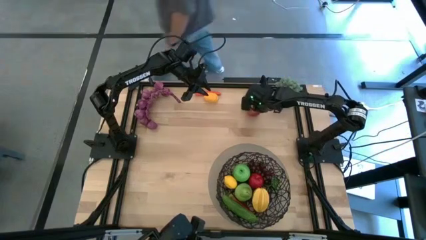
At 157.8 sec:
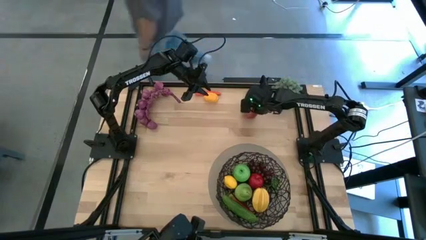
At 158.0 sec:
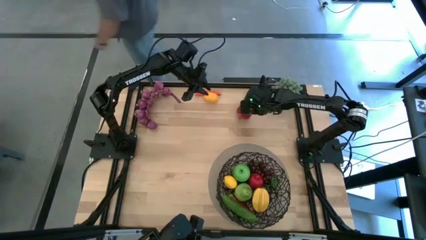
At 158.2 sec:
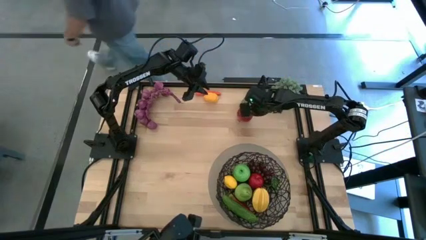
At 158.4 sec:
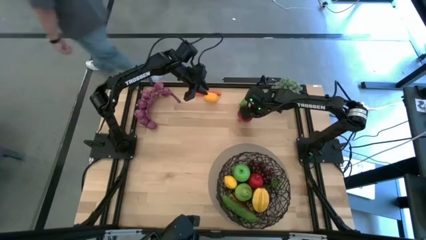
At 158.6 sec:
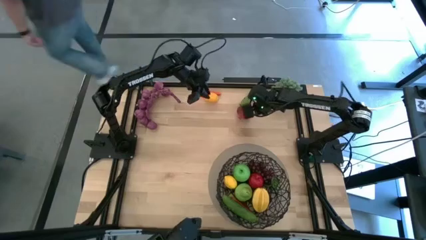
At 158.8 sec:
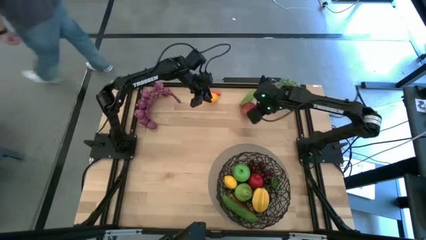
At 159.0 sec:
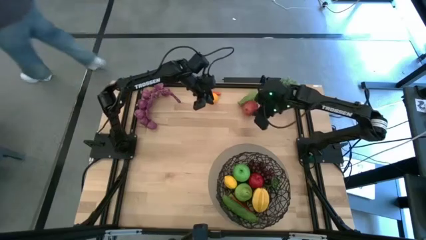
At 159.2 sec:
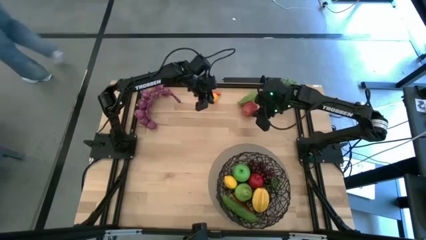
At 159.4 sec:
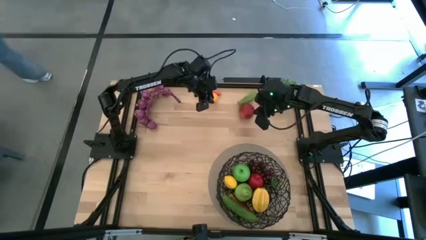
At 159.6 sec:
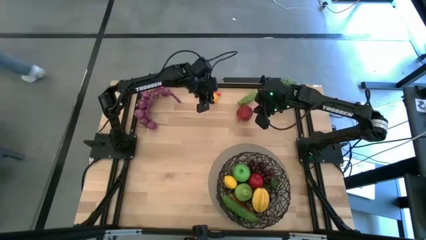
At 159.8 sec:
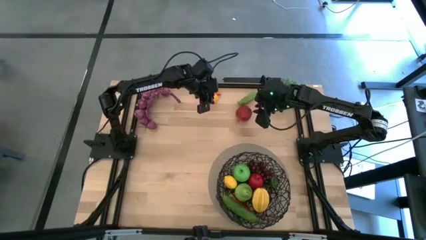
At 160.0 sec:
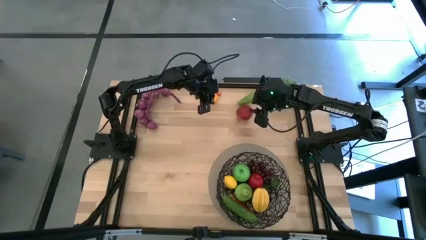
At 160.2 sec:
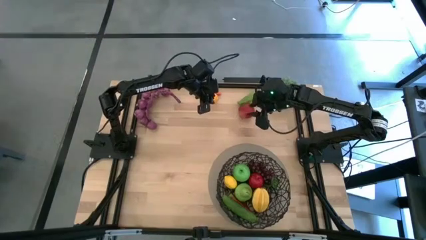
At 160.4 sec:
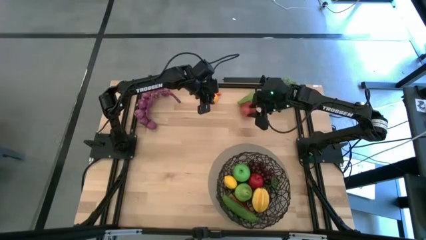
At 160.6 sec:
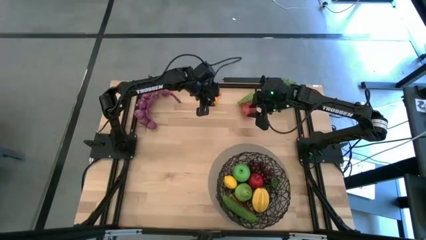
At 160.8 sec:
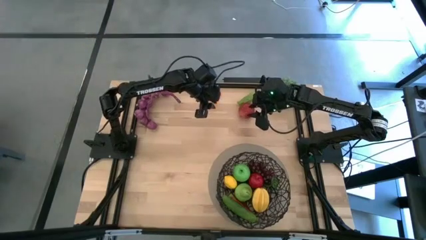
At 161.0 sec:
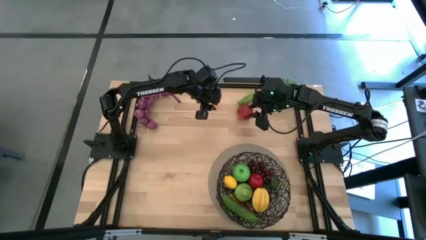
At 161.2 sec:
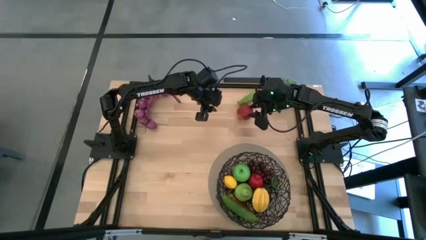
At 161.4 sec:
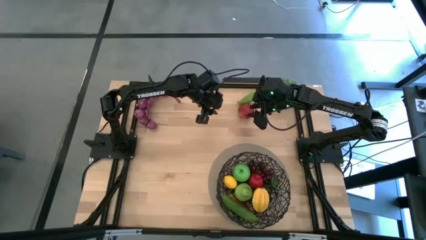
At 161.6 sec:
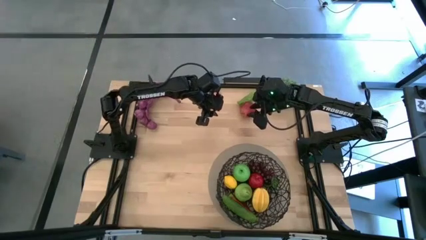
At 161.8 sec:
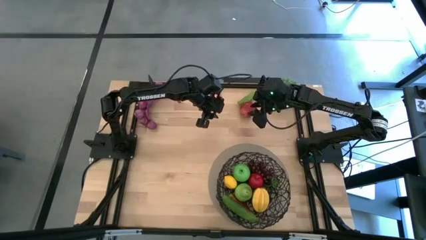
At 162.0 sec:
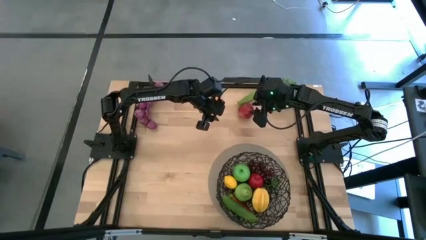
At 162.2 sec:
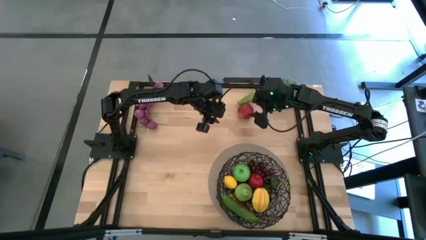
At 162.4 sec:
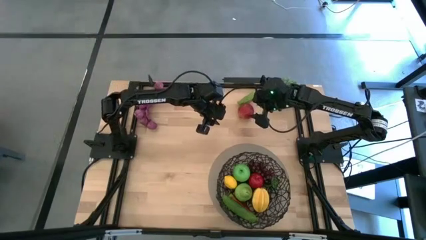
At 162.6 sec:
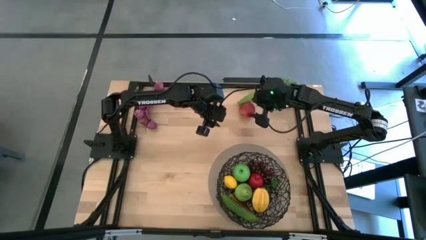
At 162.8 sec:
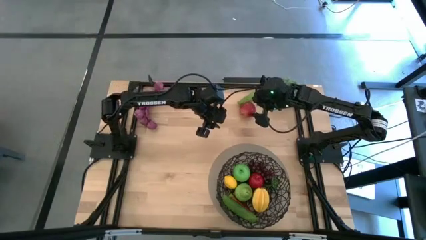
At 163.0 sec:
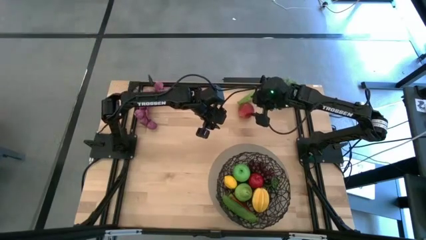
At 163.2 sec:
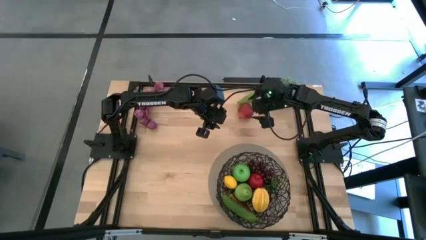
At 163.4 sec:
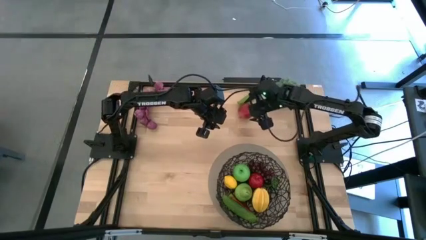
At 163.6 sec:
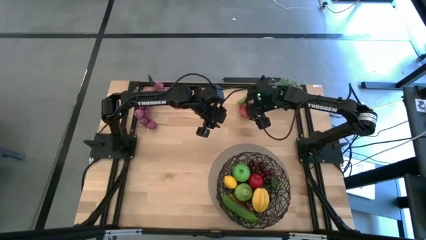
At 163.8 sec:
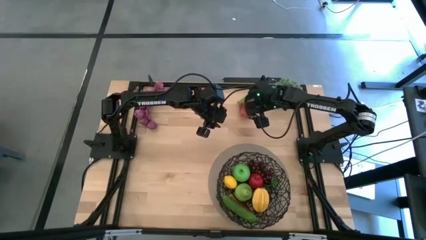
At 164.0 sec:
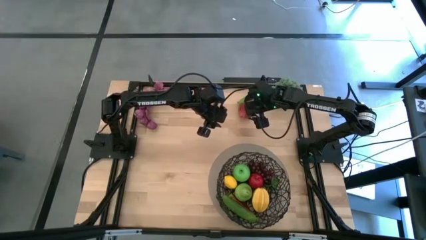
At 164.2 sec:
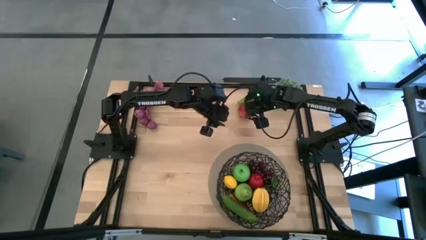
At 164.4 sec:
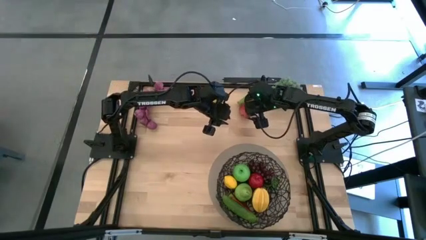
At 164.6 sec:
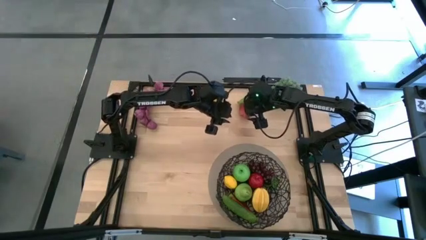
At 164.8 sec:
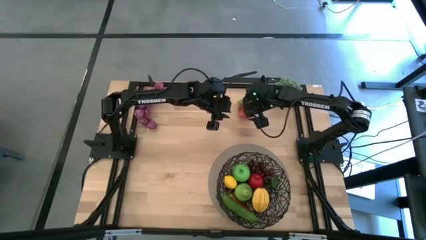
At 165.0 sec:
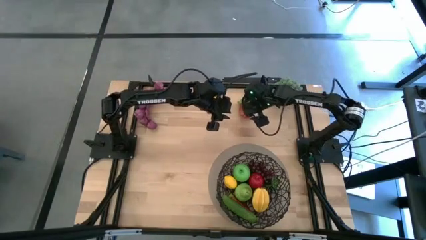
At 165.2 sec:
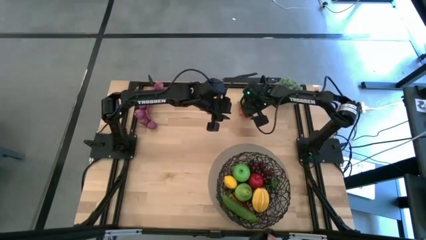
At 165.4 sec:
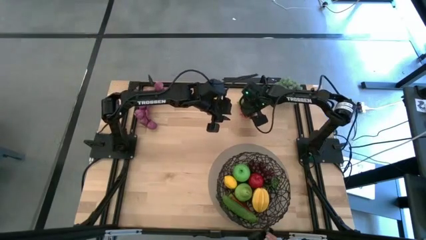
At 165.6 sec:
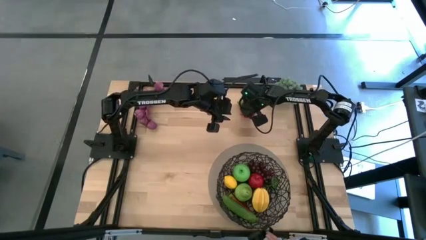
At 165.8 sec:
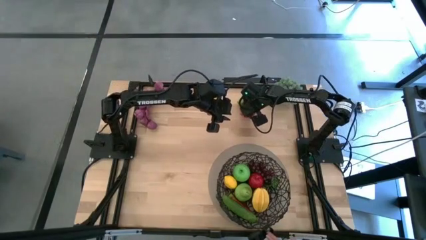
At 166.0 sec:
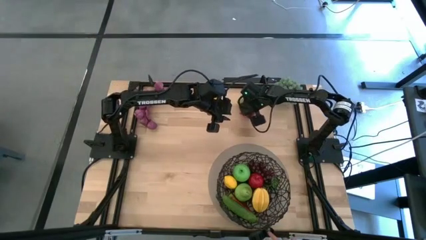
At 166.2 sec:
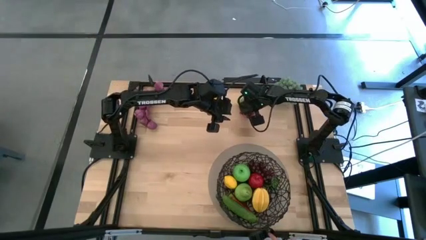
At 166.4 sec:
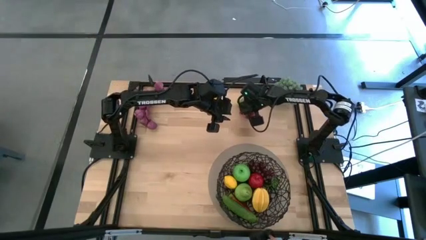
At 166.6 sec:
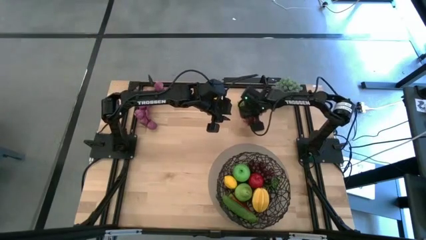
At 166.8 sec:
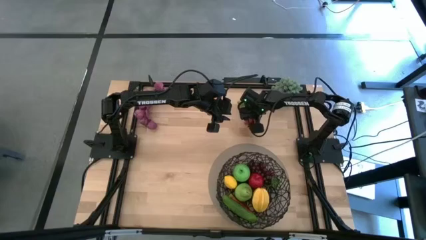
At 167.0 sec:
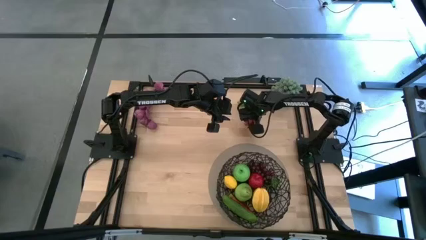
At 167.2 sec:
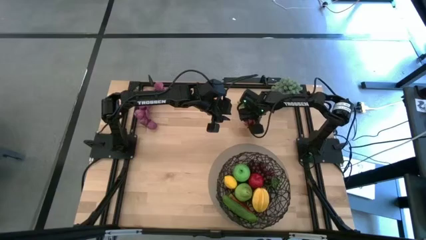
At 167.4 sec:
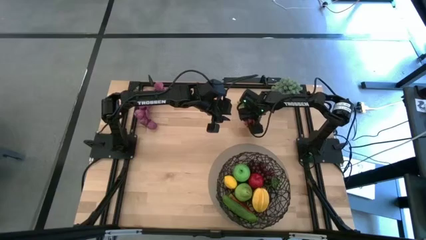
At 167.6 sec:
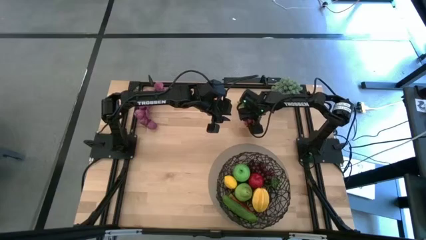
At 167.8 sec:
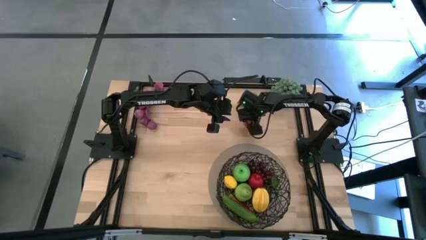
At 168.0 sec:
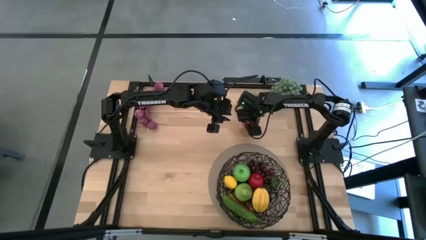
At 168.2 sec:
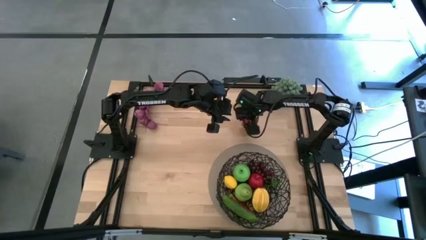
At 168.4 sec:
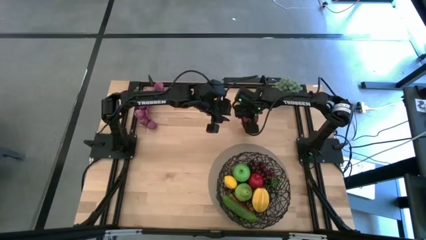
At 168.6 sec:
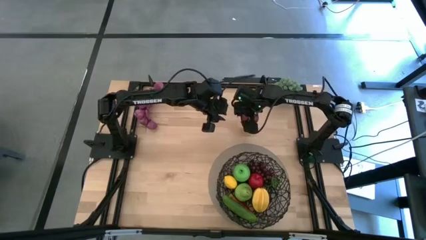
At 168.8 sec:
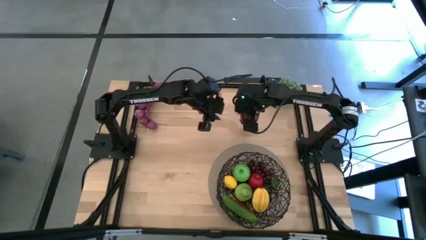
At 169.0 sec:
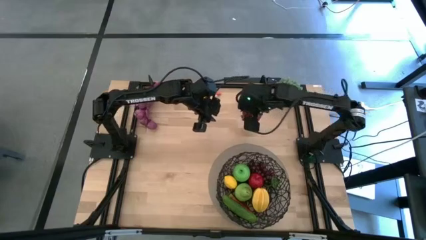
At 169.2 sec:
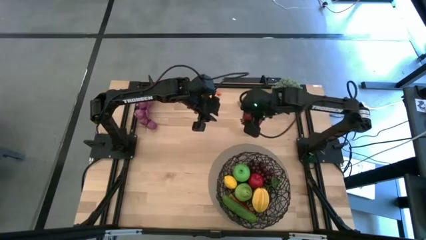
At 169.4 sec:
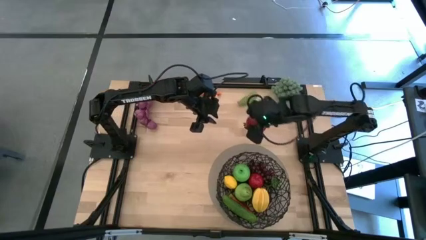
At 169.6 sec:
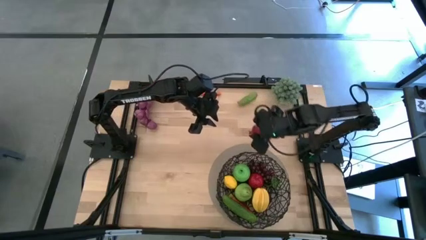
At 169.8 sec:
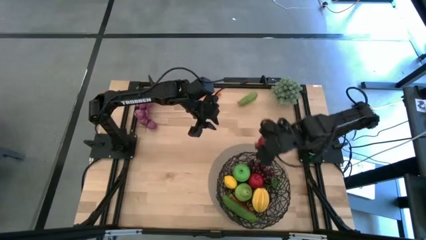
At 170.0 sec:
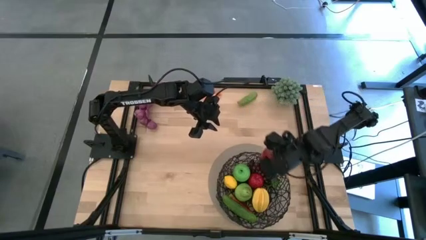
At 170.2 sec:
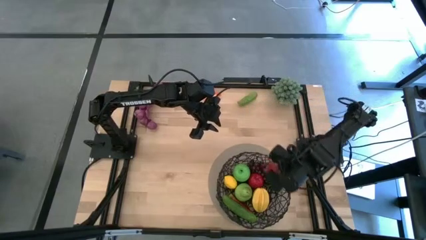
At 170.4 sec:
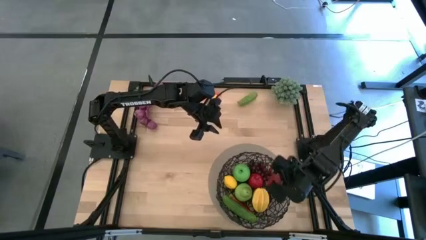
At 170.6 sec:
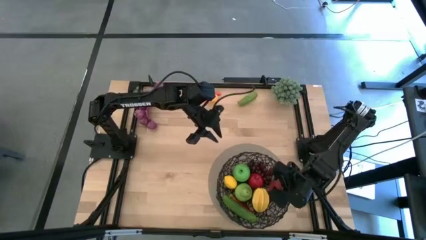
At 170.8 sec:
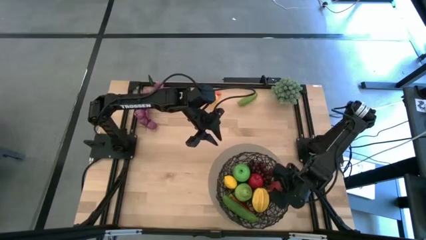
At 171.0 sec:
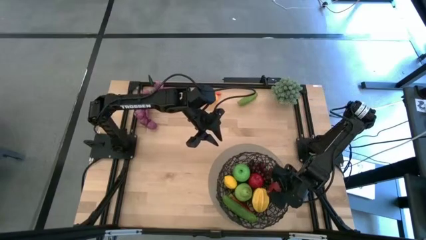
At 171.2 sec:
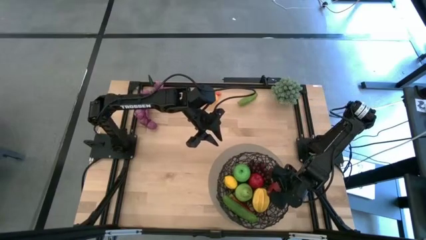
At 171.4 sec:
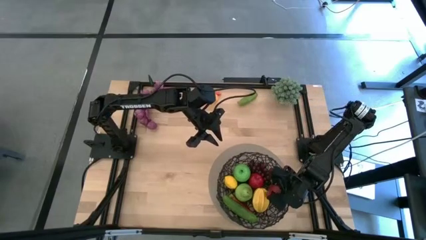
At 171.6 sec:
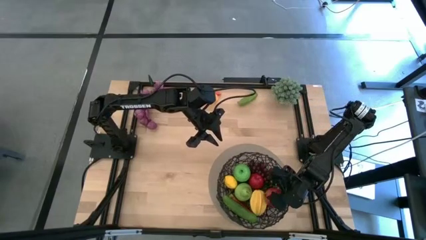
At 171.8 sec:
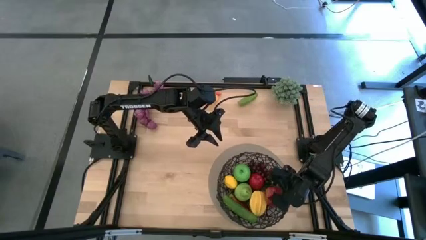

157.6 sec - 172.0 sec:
Task: Build produce basket
Put the red pomegranate into the wire basket

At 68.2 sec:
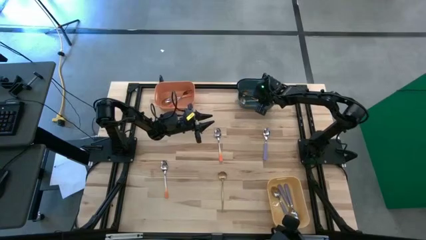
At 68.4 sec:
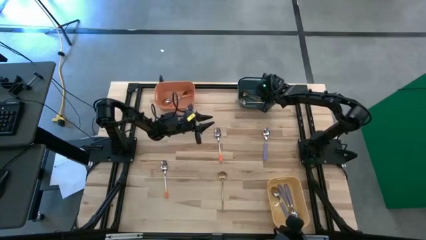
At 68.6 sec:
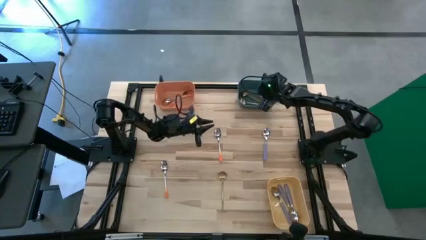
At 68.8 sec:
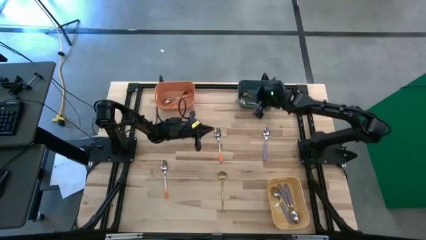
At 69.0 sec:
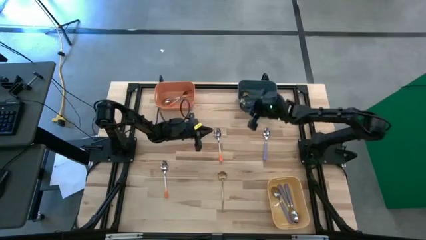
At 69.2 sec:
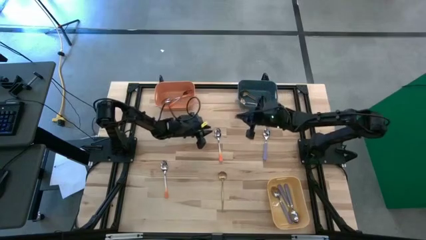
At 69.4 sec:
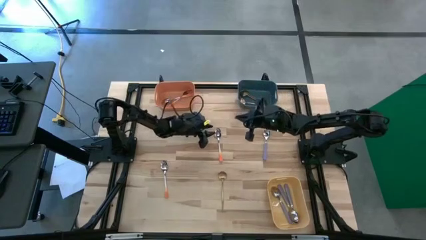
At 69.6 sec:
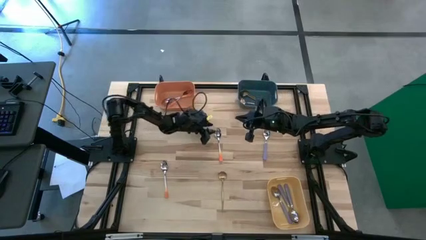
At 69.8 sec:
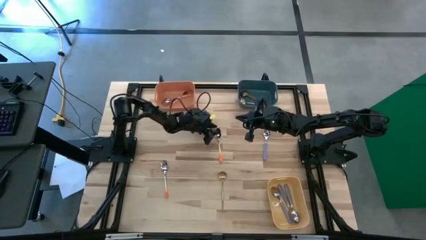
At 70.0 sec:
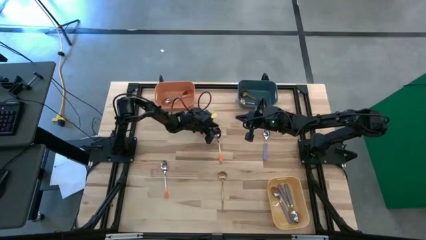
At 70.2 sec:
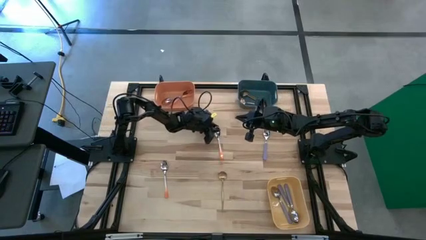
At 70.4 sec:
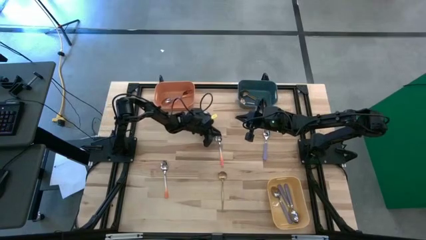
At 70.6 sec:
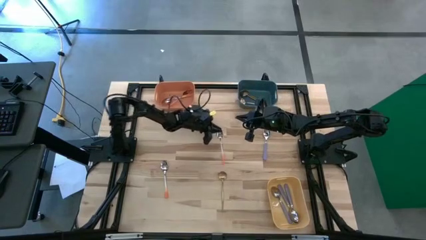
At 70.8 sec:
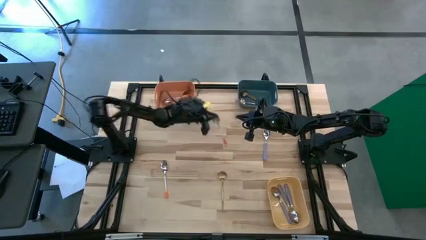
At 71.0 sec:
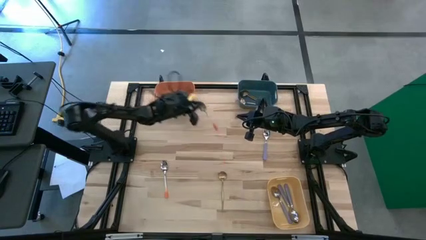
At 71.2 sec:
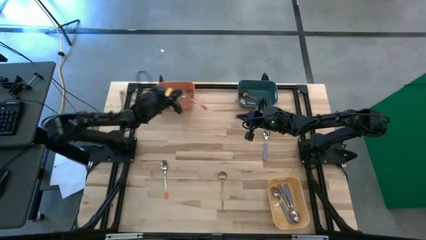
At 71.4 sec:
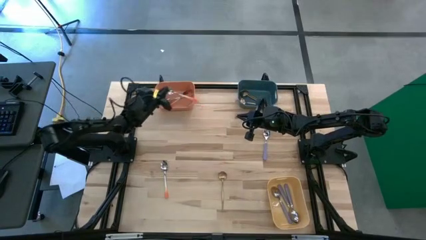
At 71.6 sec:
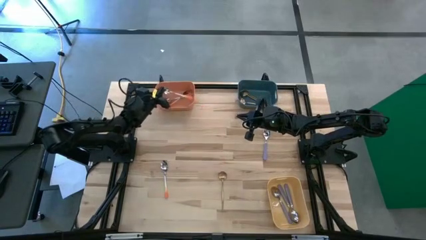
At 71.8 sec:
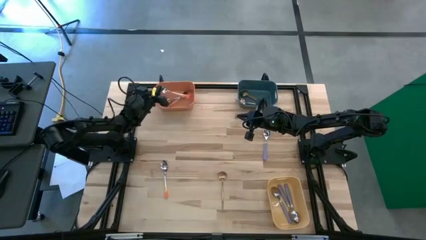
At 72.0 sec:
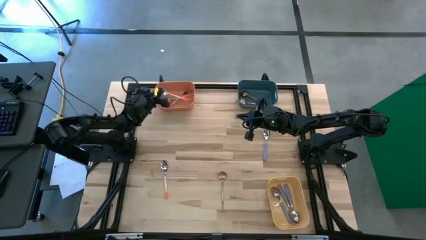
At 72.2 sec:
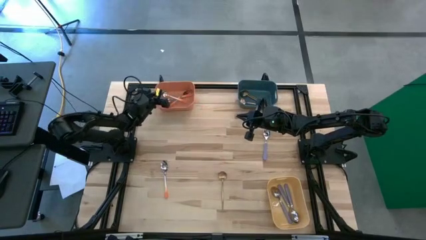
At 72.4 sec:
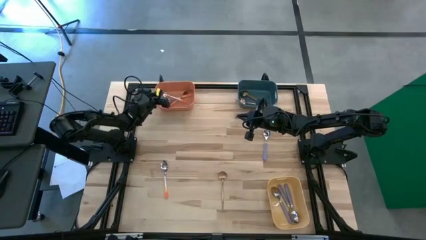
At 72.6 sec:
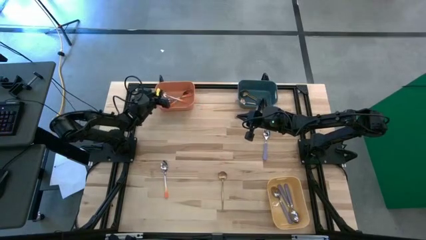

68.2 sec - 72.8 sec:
Task: Sort silverware by color (type)
Put the orange spoon into the orange bin
